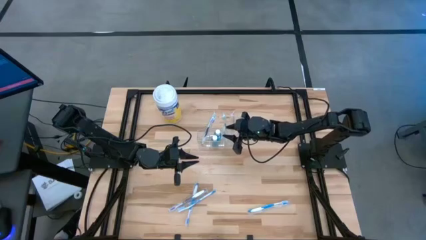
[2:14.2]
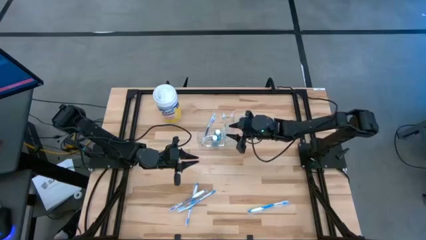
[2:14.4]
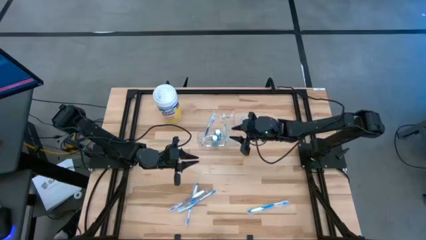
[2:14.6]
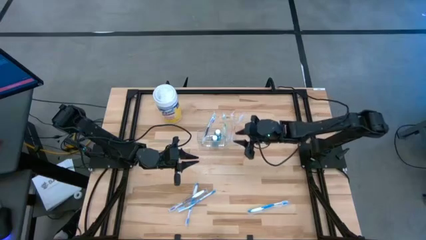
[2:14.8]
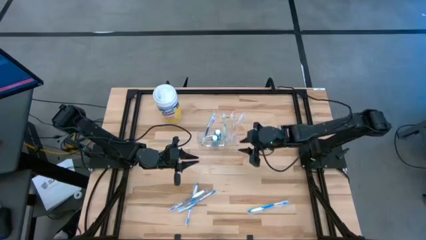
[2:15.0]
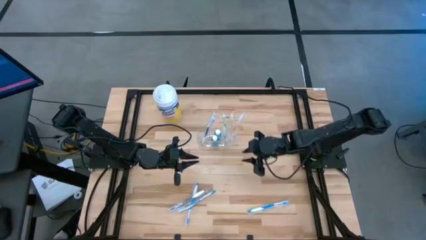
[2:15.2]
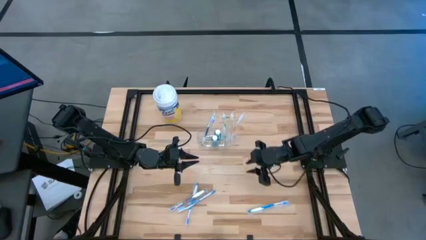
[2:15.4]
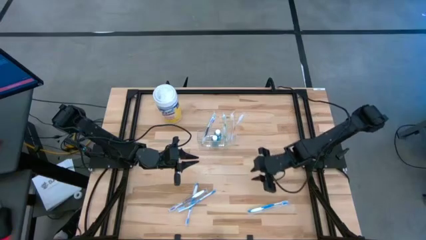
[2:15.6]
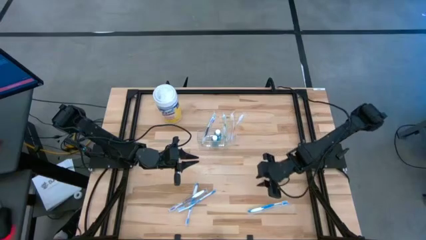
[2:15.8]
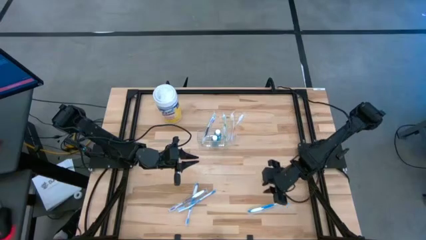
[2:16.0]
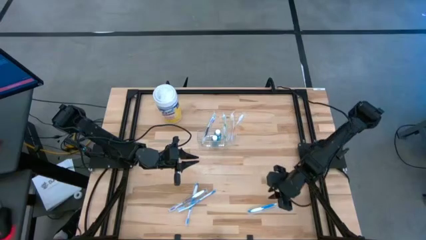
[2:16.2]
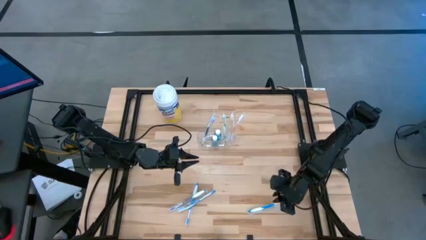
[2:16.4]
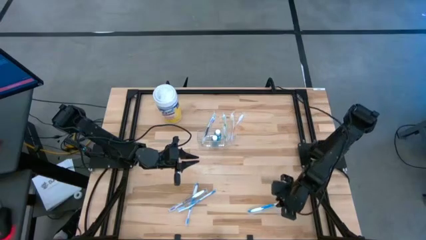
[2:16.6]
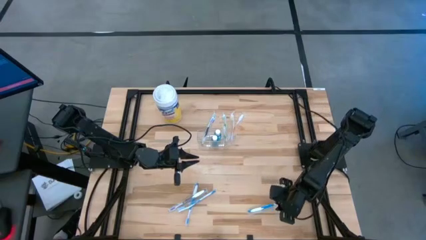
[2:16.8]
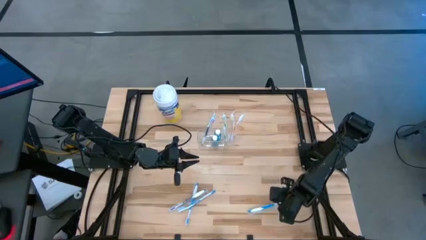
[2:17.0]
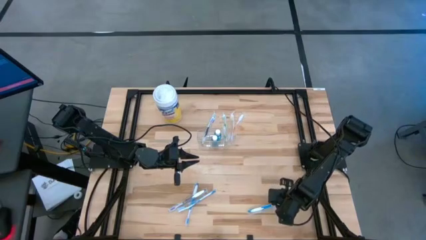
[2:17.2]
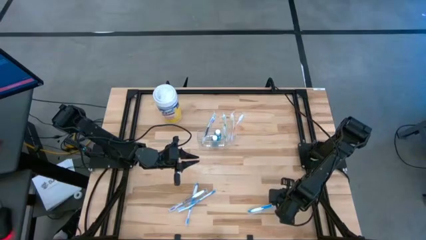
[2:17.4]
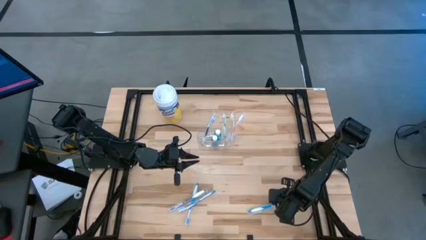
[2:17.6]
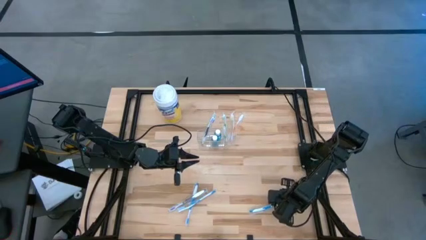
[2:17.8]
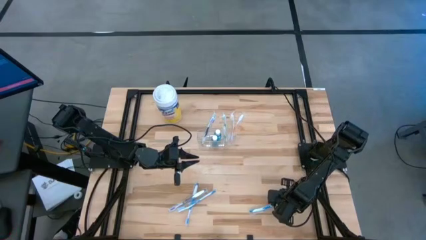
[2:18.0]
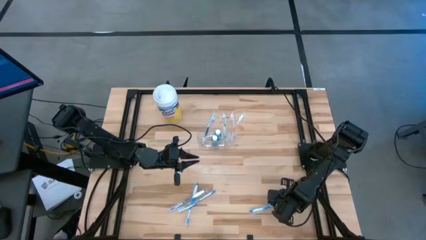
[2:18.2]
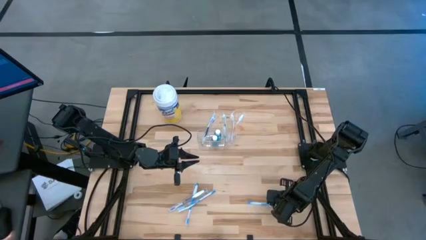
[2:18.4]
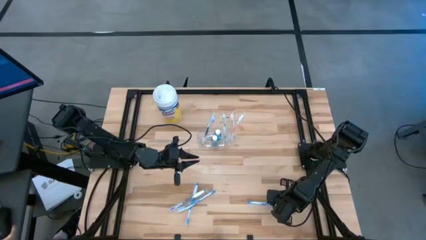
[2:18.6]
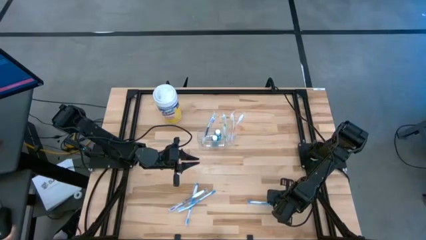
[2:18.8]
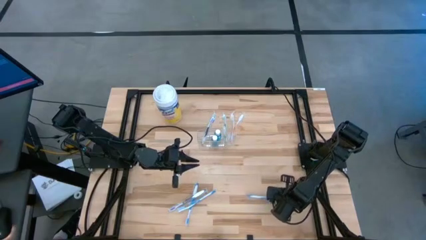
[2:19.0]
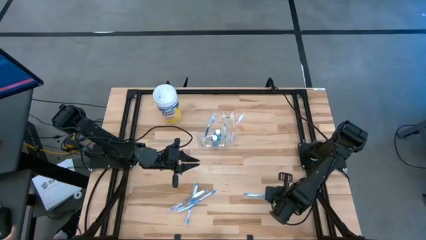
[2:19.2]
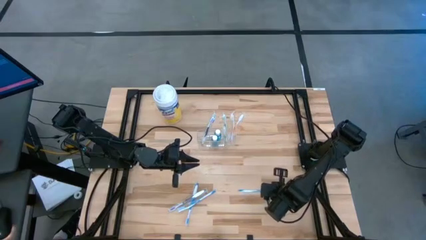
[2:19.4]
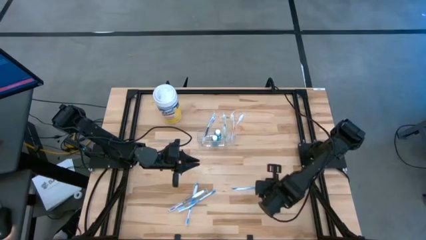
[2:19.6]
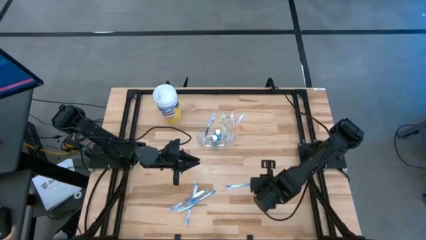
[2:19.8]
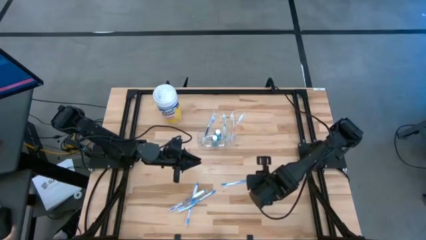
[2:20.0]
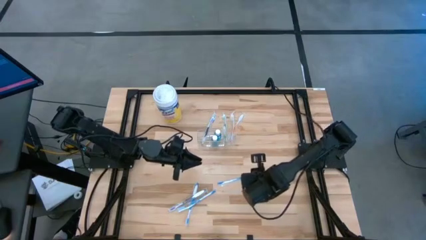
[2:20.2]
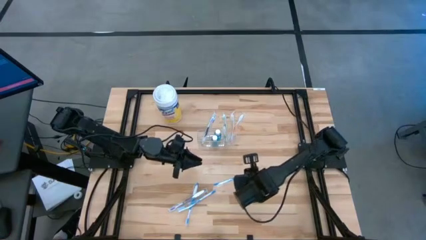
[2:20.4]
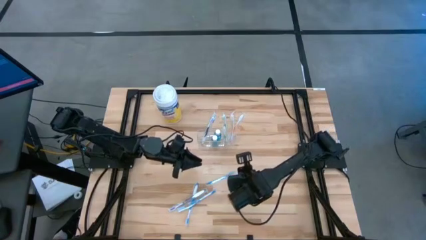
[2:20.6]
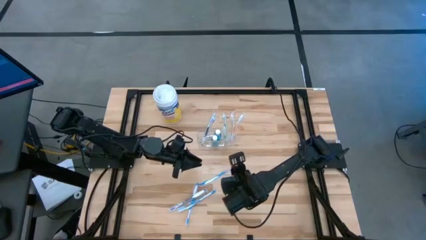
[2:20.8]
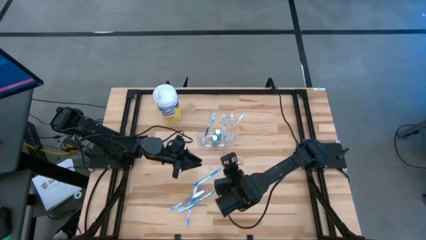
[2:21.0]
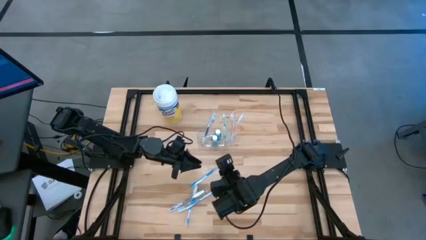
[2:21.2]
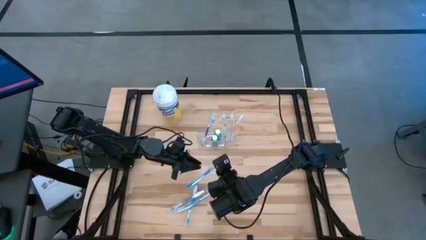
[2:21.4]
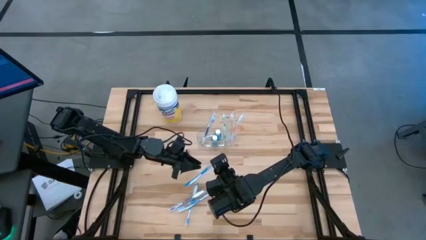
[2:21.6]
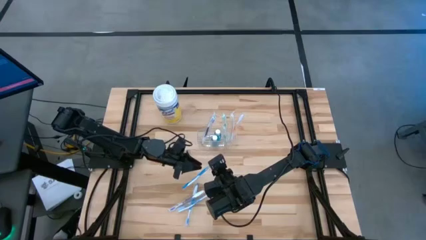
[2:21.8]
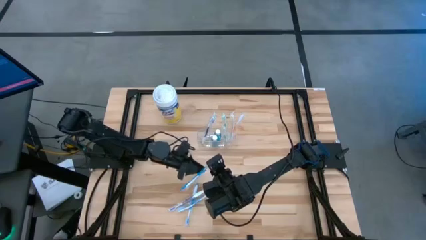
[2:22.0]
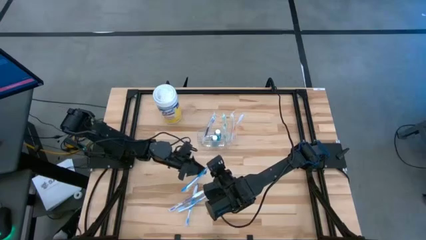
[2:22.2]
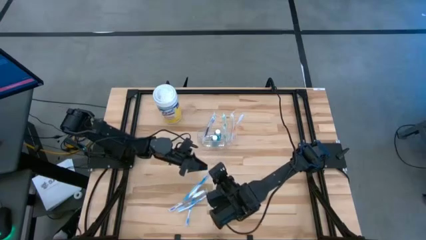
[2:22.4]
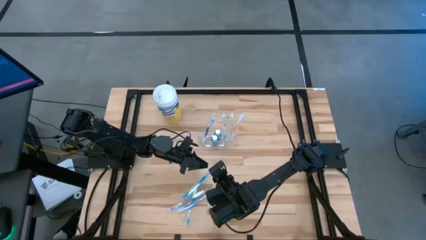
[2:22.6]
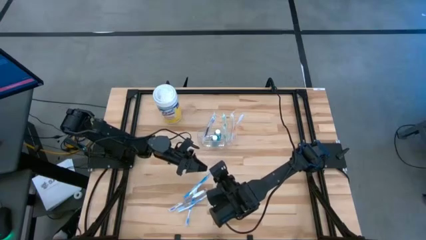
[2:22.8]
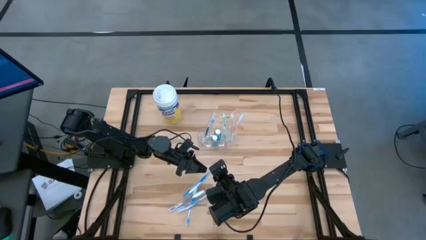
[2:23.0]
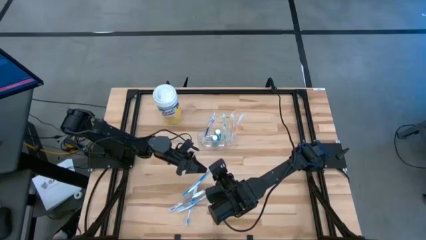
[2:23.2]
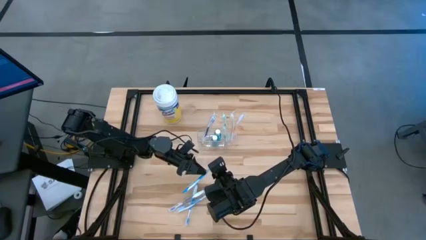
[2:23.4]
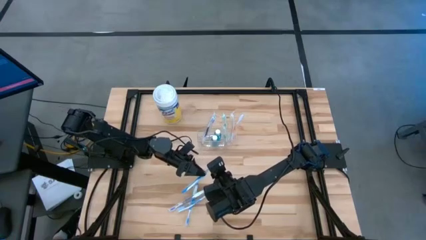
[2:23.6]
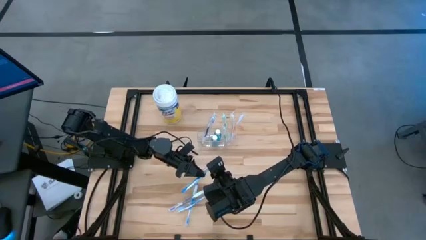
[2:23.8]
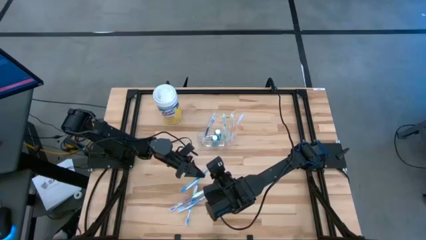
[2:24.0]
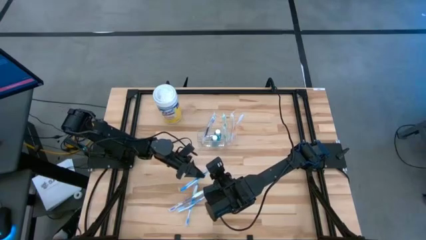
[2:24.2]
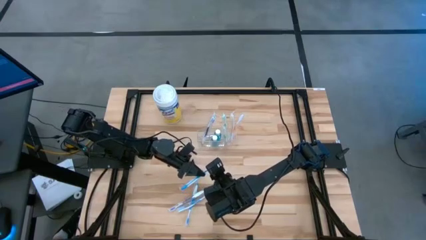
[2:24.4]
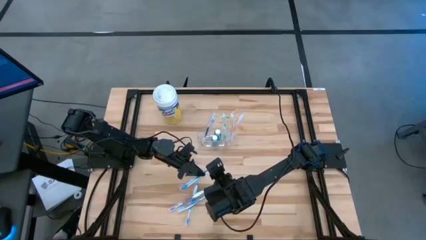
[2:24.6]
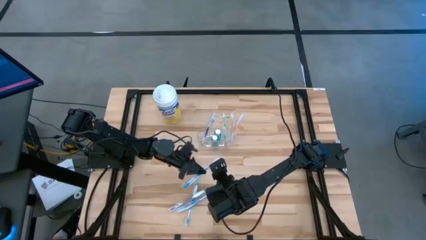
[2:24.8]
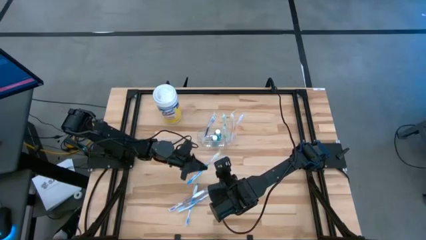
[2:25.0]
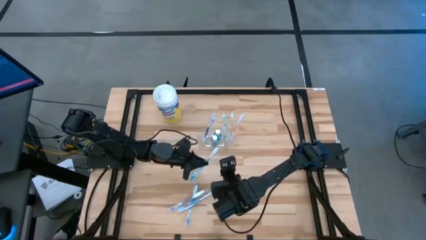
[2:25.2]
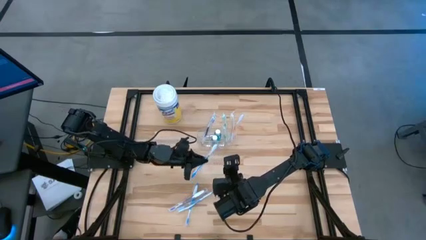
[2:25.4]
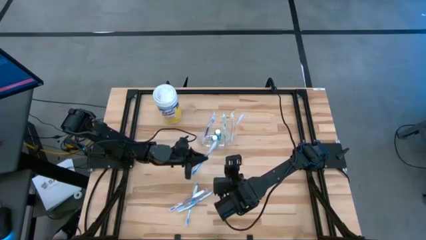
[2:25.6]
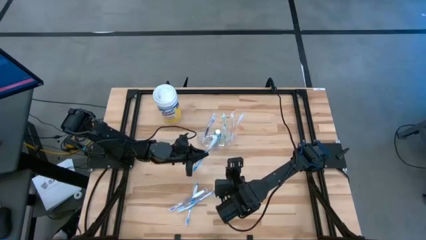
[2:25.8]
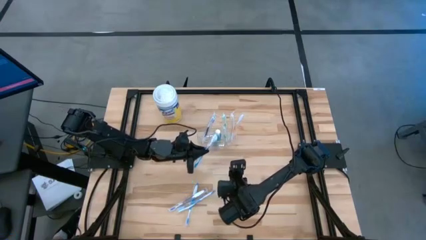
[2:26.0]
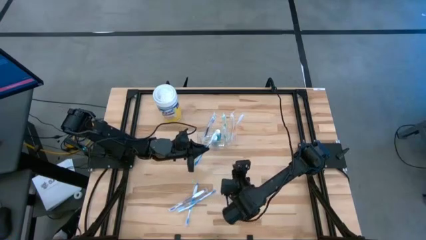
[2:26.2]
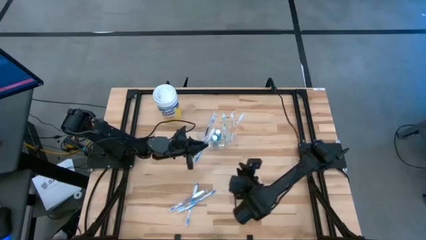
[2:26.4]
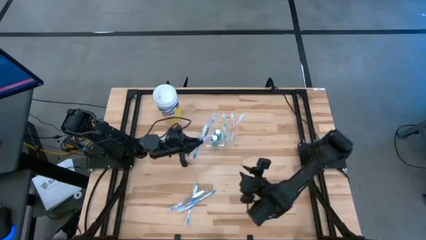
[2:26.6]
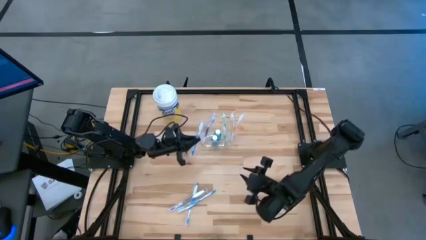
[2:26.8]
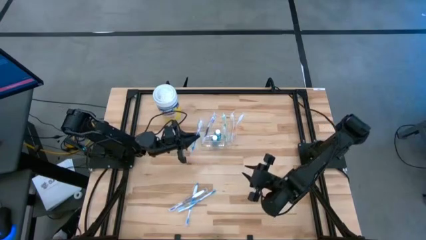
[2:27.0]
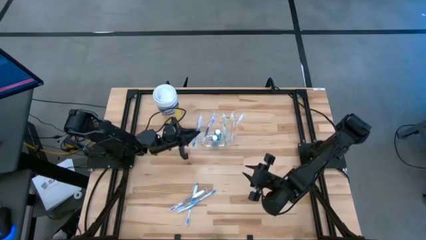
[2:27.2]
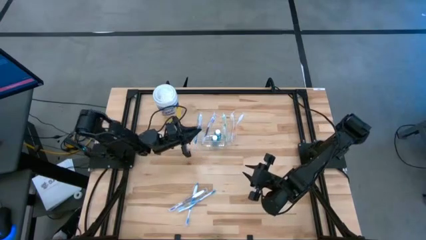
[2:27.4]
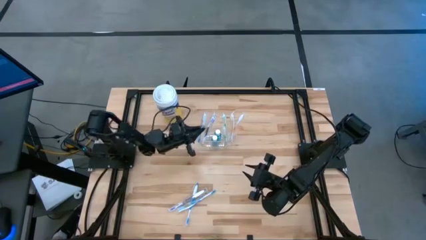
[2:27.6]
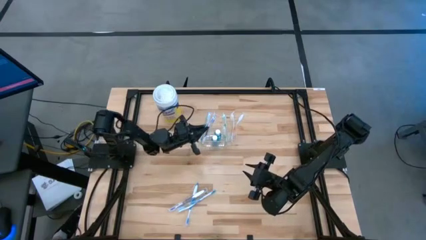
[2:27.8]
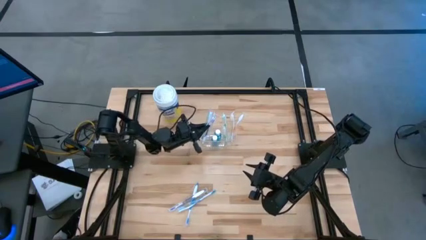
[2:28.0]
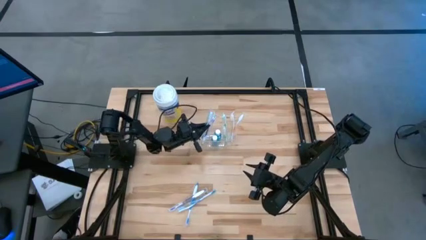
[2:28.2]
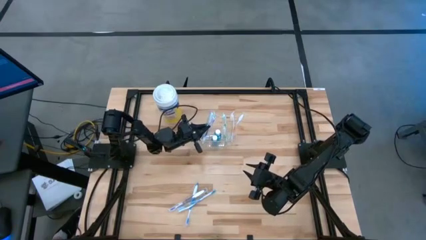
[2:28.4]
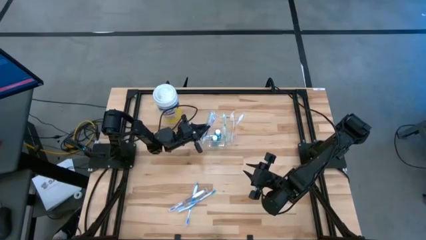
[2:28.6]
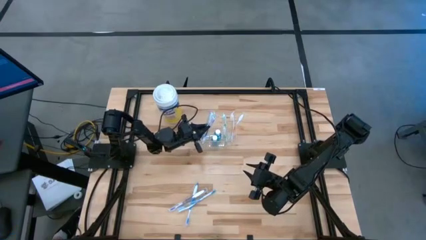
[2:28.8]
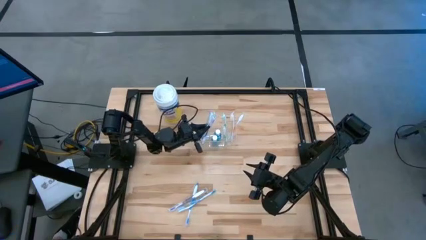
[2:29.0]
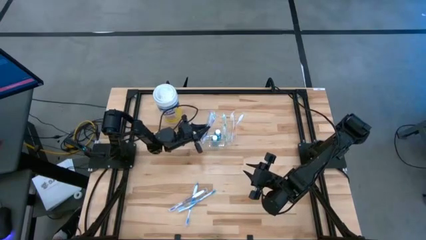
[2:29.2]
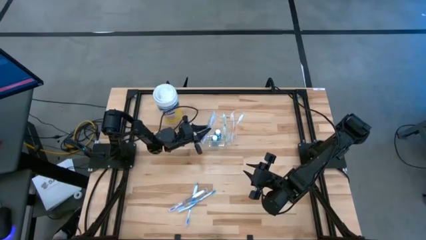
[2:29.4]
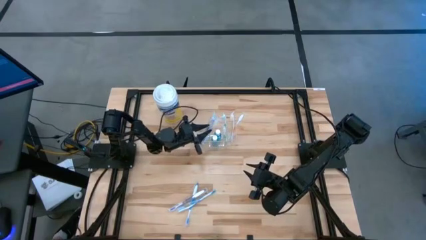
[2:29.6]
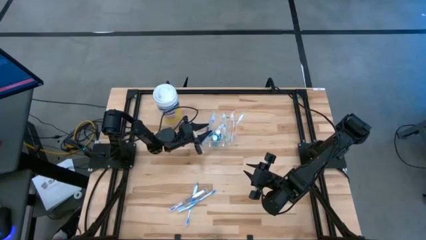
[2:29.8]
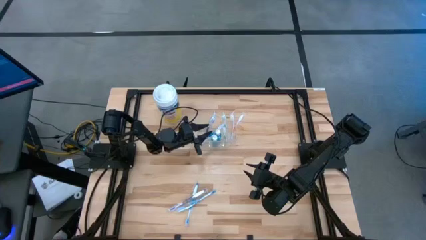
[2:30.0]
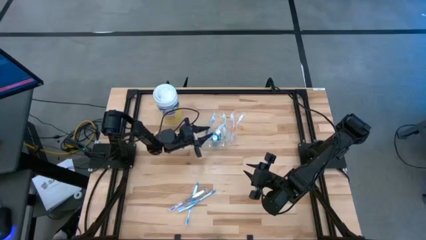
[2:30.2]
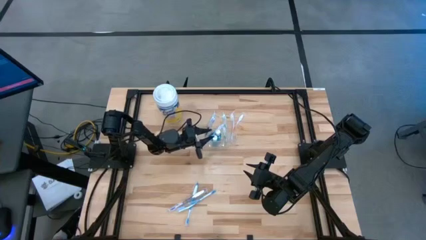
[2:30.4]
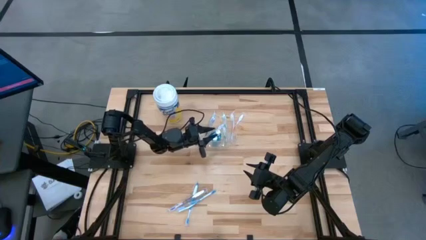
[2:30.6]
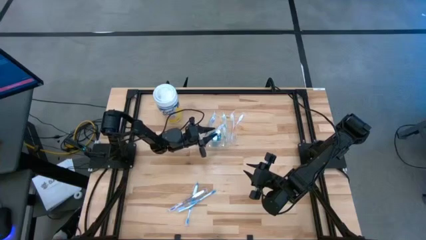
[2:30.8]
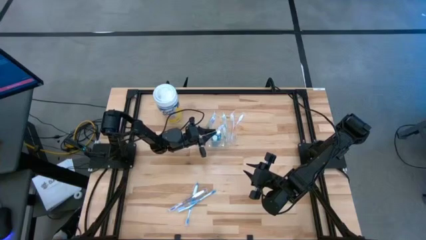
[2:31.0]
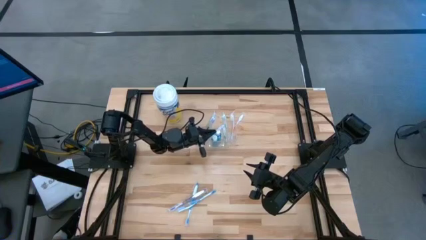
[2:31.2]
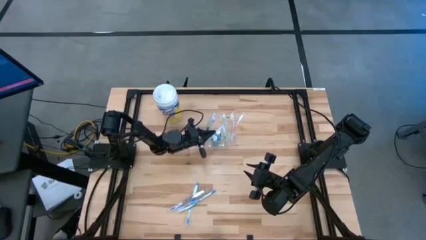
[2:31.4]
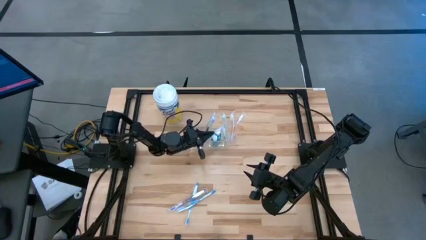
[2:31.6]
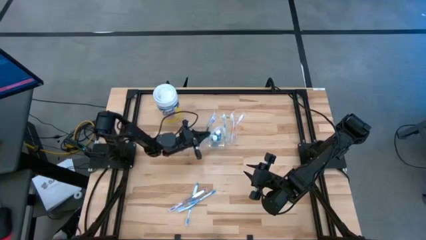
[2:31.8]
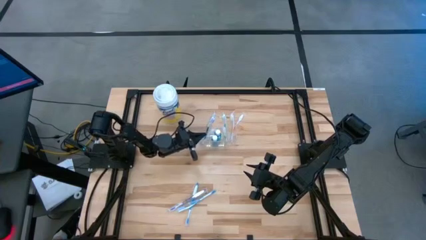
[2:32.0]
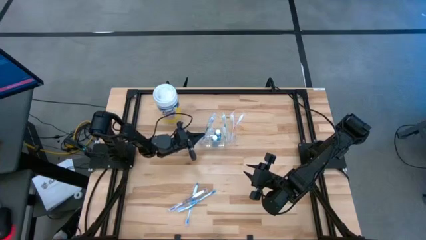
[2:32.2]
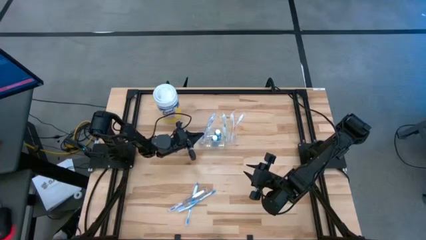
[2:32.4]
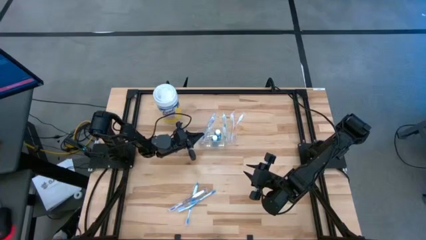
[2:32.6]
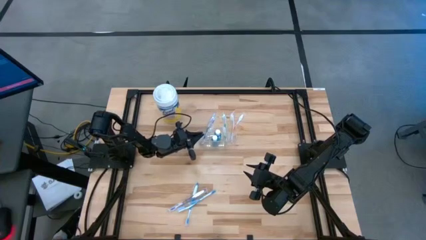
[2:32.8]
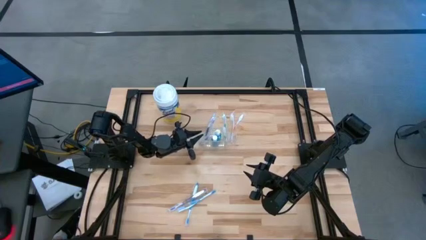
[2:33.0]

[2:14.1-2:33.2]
Task: Pick & Place toothbrushing station
Put the right blue toothbrush into the transparent organizer
